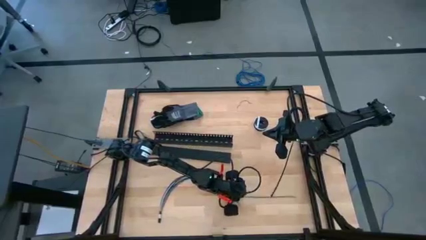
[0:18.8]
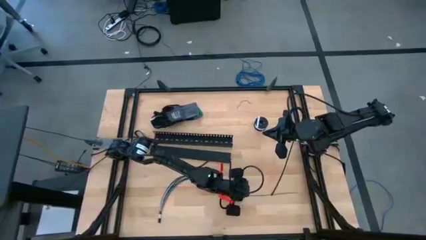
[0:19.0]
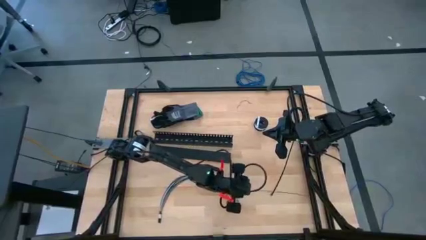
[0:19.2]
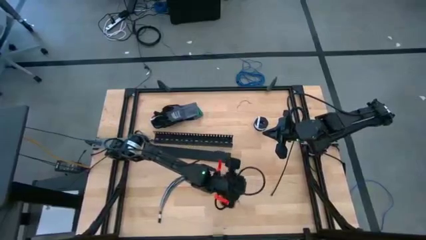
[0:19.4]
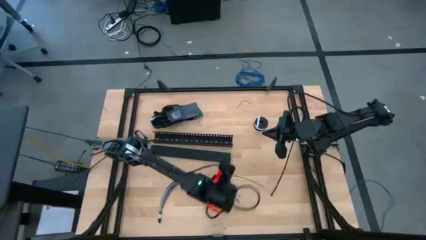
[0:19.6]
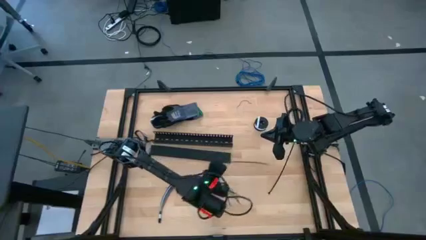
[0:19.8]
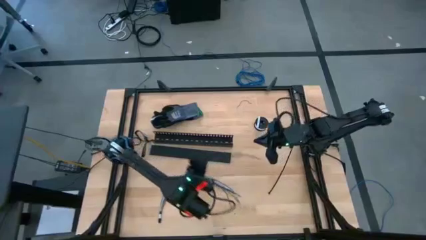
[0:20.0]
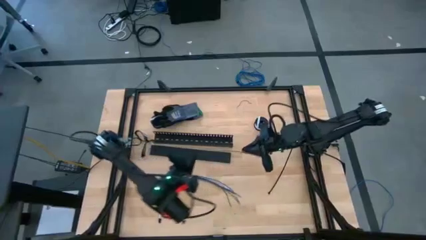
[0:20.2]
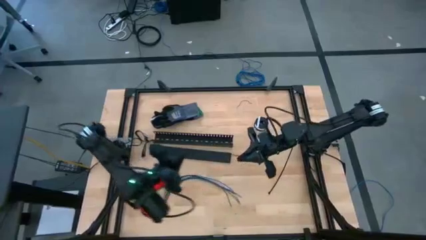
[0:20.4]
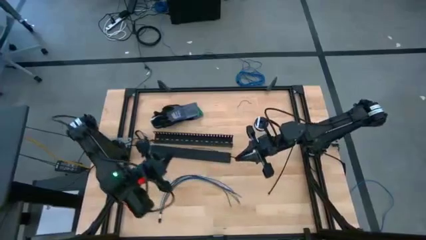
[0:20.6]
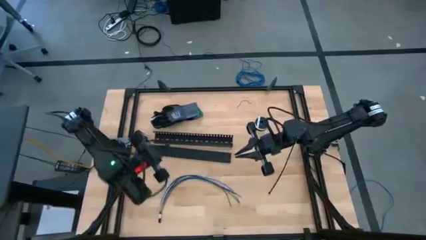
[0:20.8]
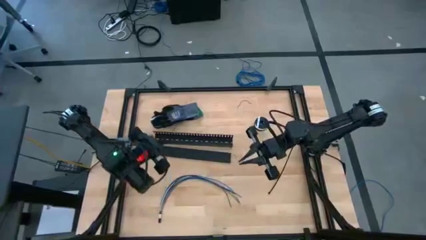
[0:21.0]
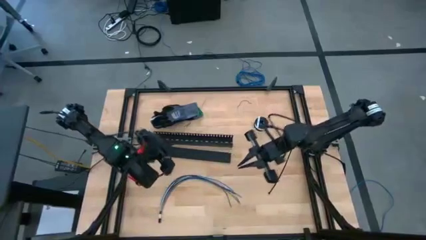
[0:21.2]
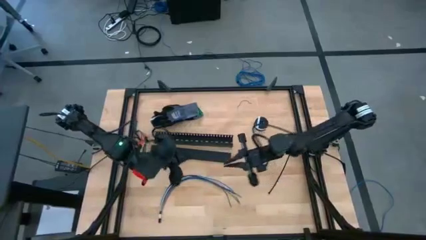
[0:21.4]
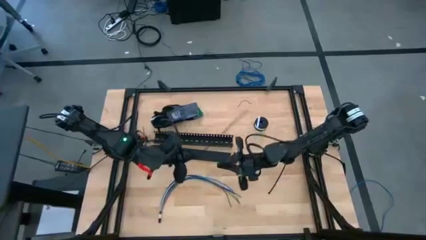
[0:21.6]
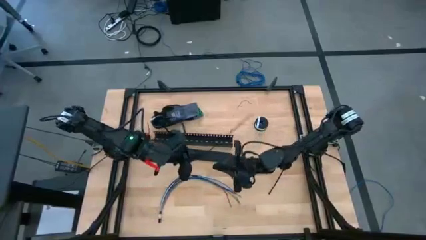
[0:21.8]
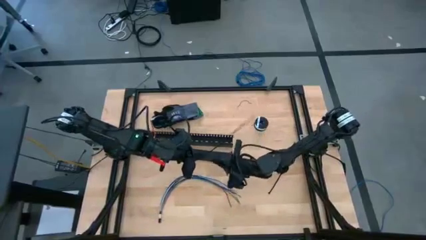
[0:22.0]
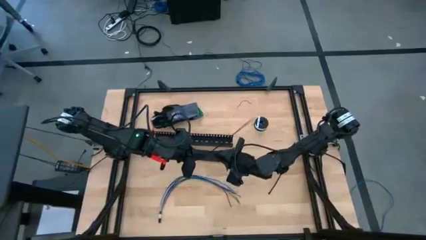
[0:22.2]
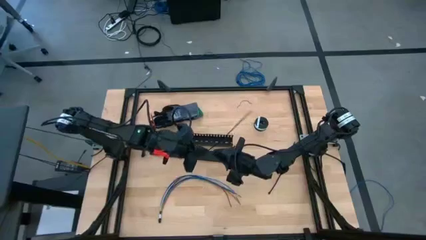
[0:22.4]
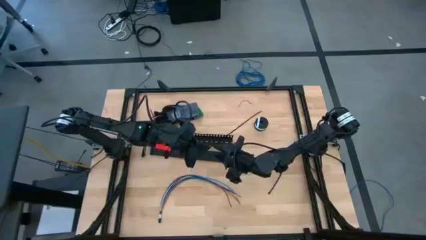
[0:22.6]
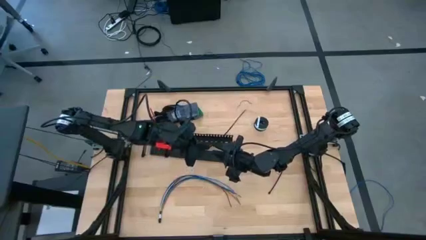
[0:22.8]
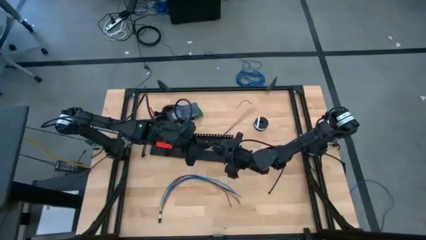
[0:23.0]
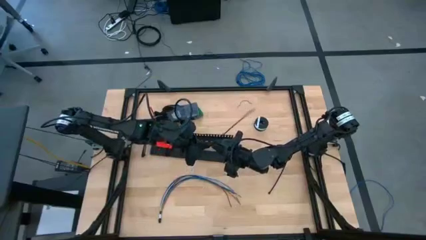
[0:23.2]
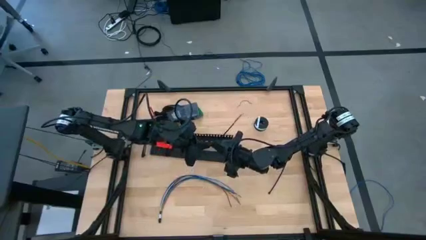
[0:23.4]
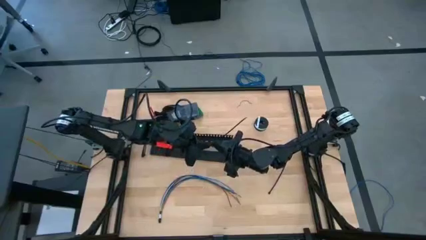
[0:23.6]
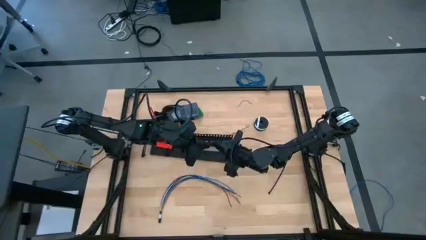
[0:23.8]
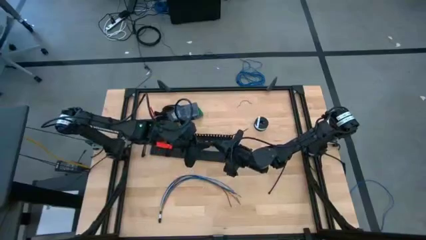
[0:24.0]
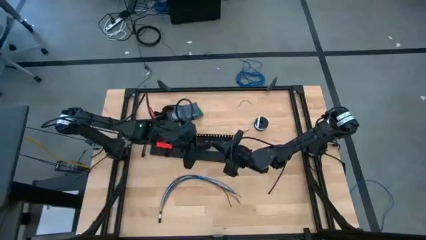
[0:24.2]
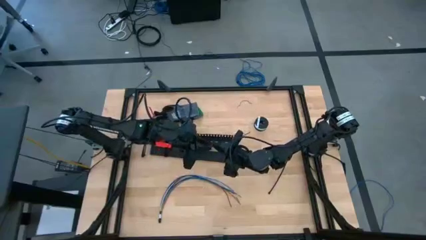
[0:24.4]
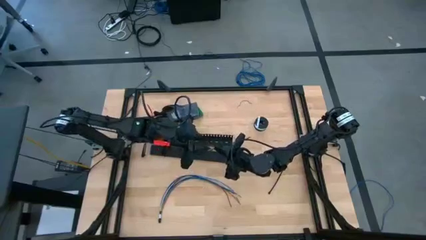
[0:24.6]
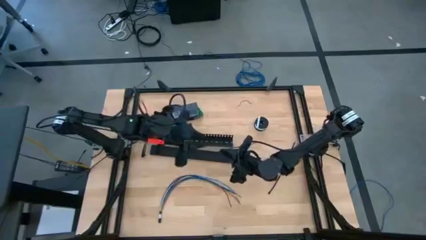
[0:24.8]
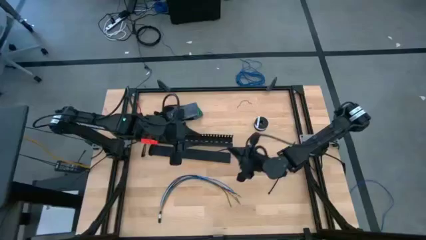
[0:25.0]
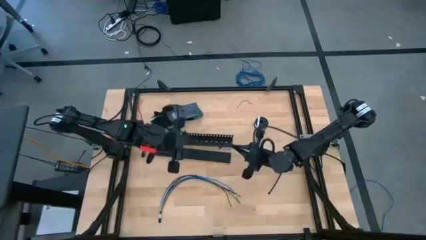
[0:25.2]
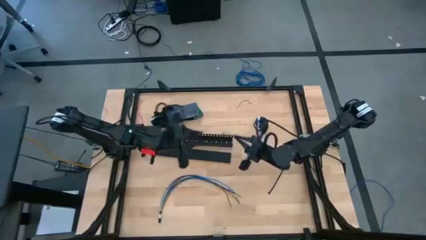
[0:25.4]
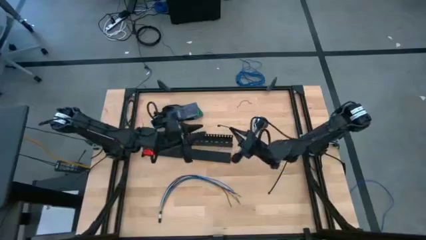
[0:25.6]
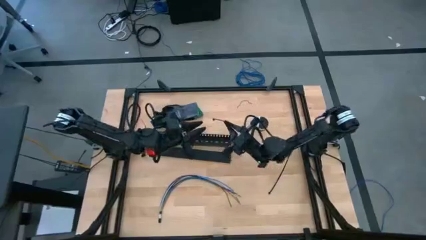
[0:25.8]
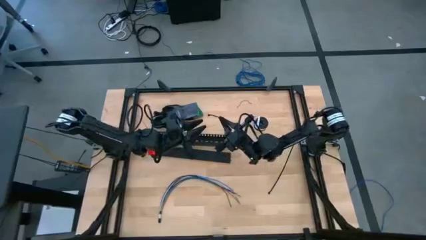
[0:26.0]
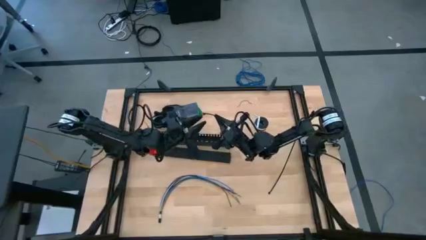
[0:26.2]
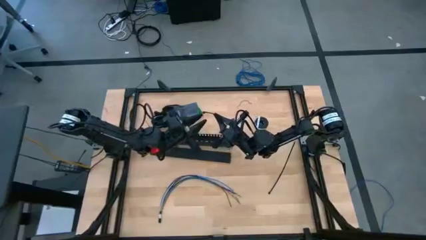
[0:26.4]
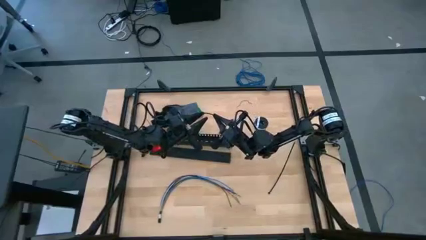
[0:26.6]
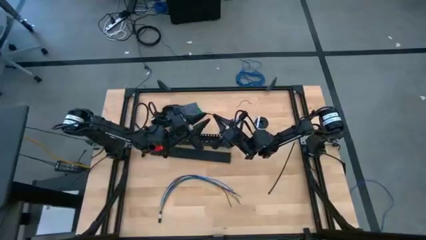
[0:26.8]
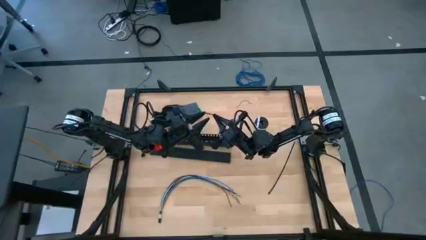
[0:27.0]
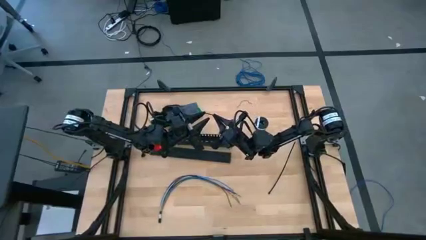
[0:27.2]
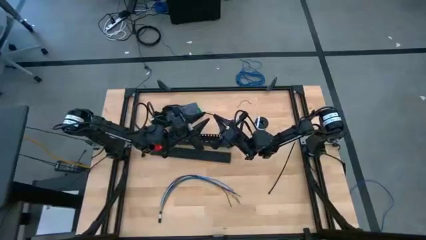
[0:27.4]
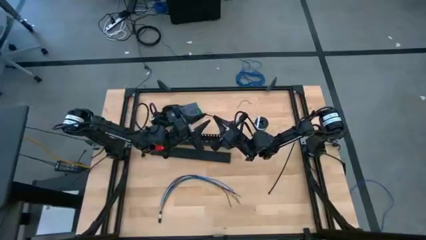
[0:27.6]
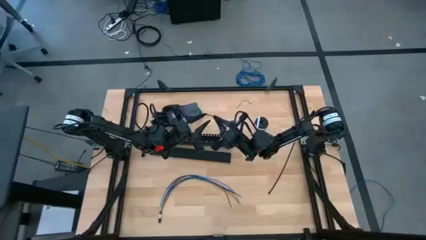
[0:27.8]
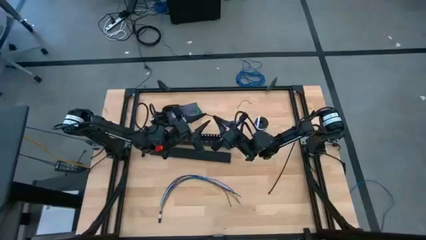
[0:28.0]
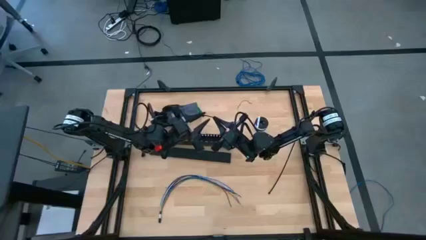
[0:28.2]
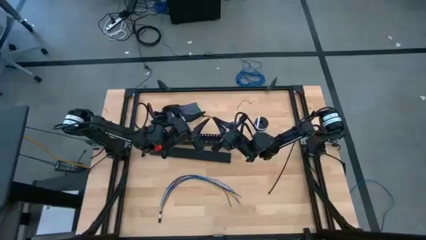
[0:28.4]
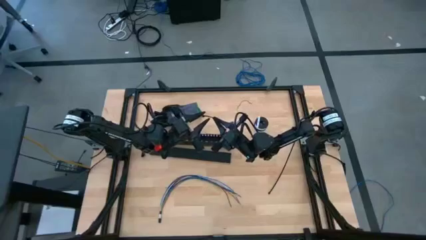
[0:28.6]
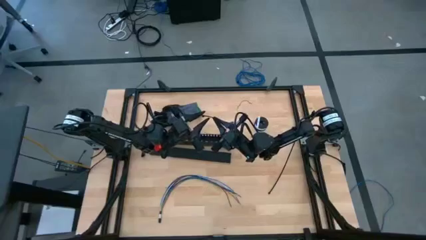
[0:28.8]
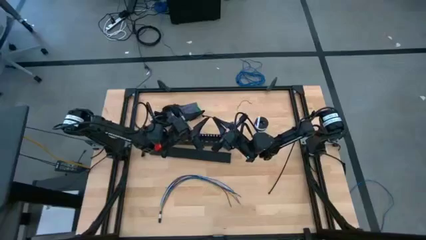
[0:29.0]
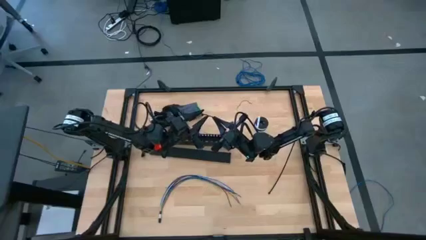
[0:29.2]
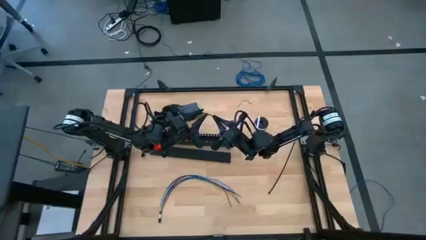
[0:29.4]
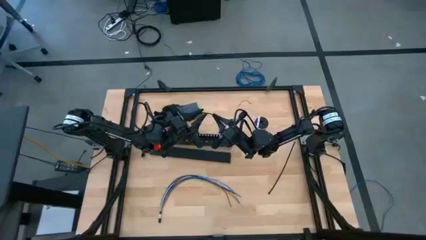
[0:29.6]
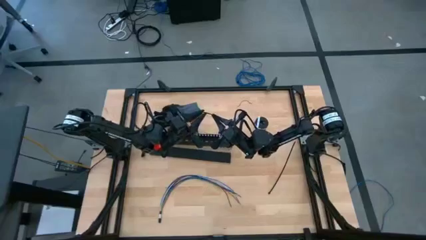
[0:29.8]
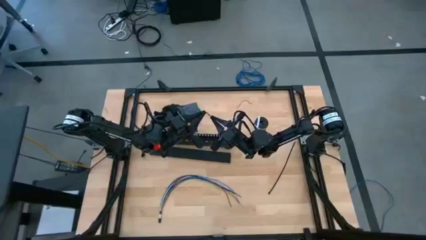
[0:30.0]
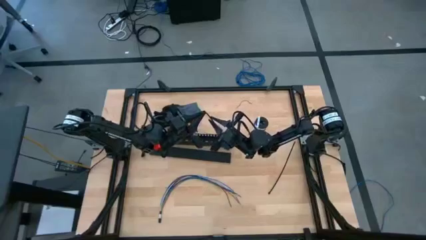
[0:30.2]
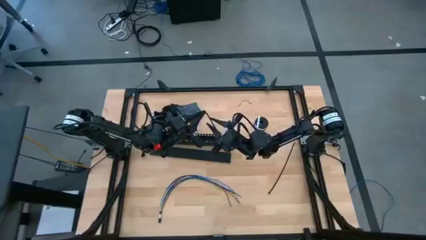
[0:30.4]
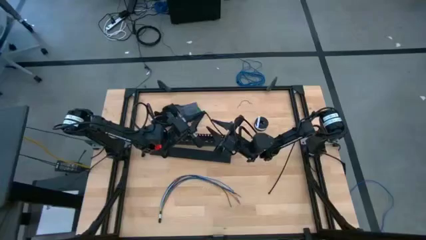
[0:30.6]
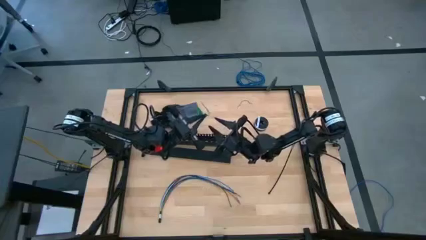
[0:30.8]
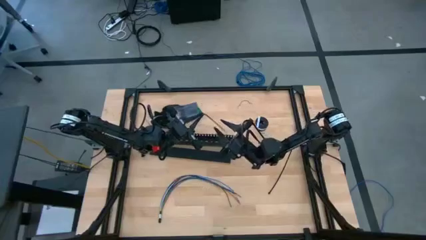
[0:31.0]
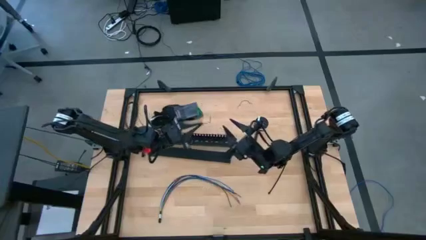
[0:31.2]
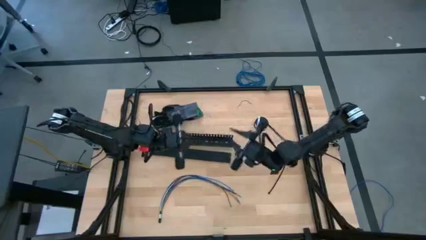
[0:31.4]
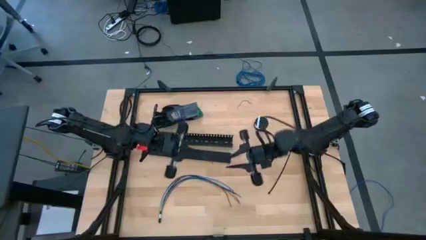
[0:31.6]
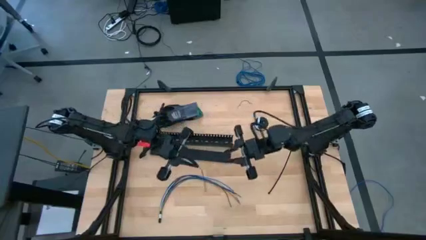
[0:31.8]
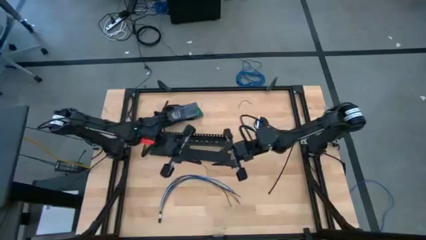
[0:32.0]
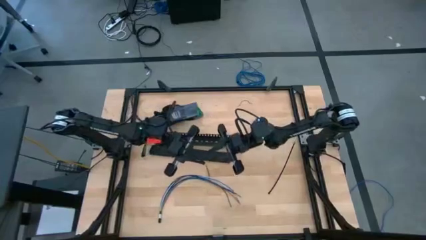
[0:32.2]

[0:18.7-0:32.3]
Task: Ziptie cables
Prepare the left black zip tie
